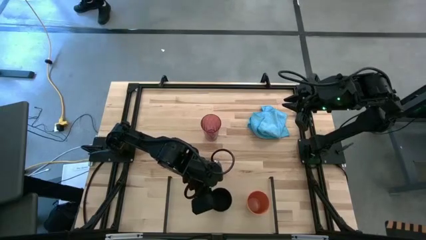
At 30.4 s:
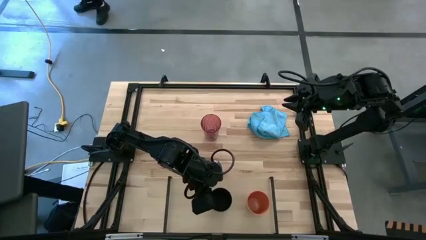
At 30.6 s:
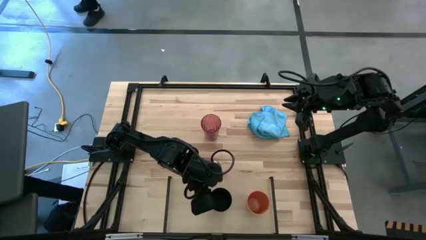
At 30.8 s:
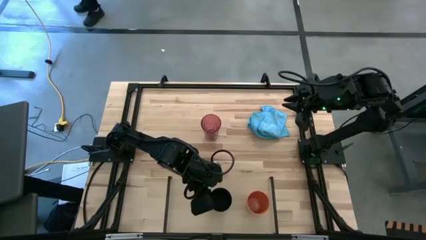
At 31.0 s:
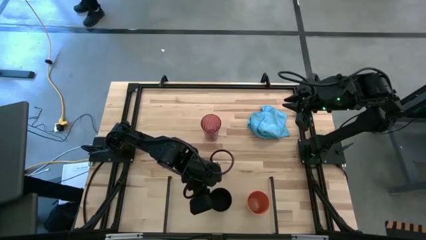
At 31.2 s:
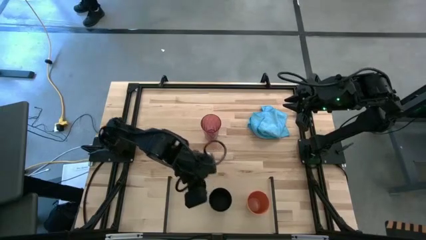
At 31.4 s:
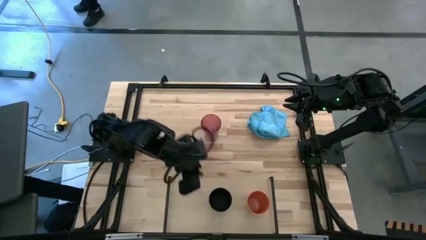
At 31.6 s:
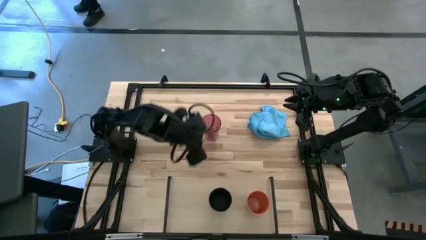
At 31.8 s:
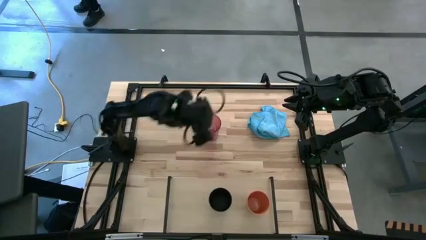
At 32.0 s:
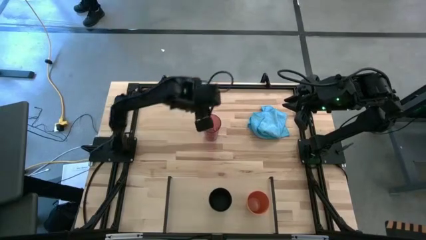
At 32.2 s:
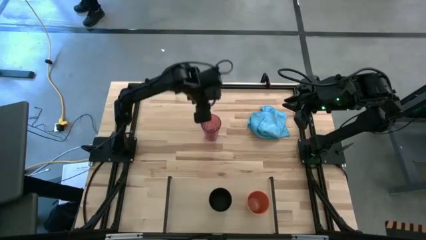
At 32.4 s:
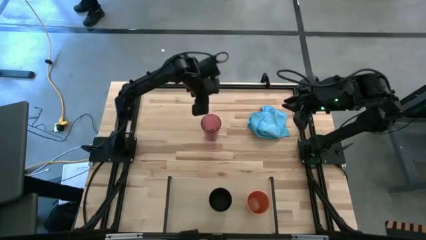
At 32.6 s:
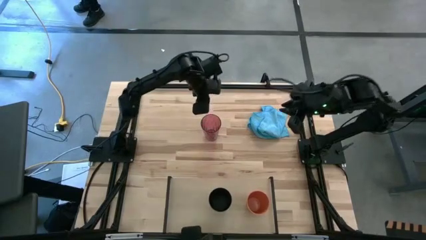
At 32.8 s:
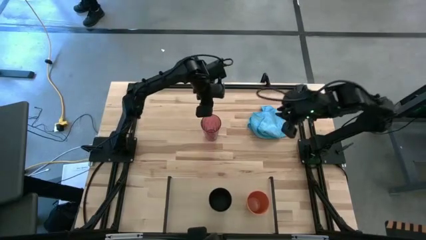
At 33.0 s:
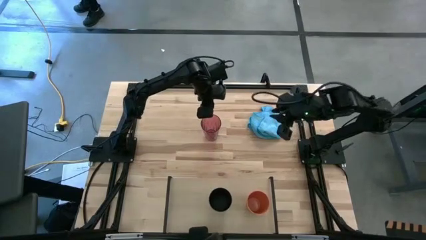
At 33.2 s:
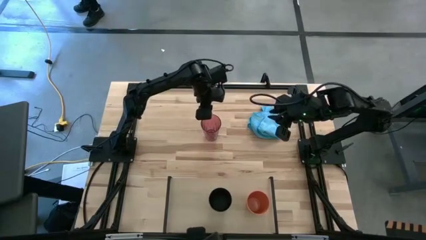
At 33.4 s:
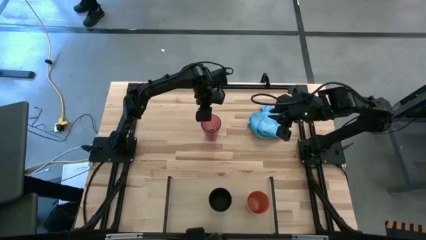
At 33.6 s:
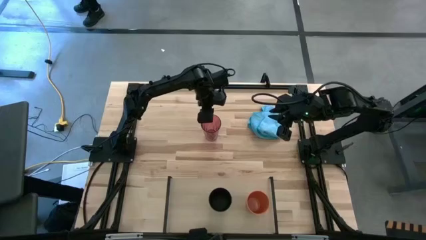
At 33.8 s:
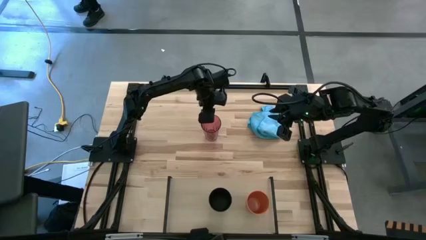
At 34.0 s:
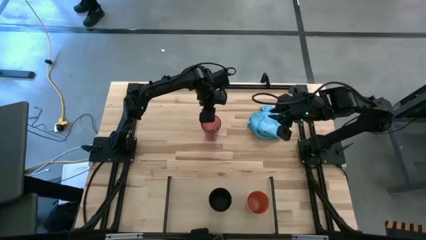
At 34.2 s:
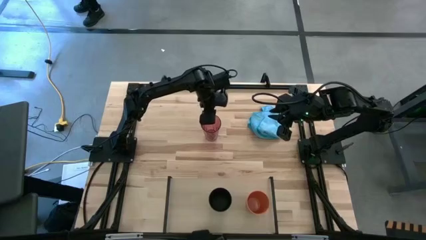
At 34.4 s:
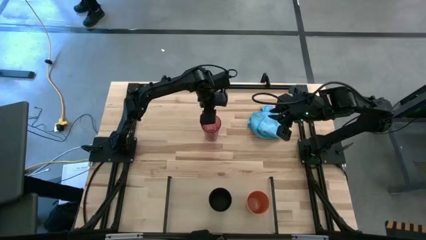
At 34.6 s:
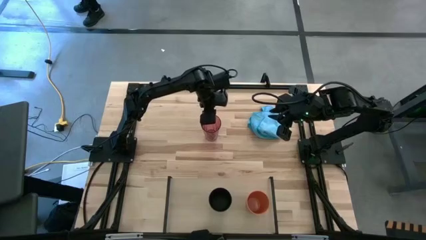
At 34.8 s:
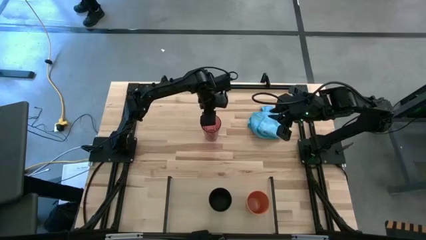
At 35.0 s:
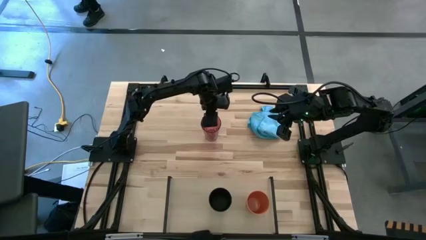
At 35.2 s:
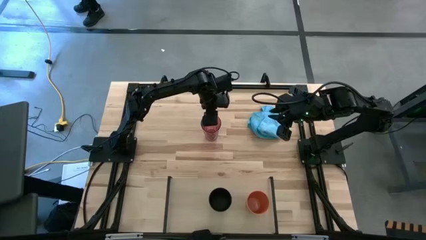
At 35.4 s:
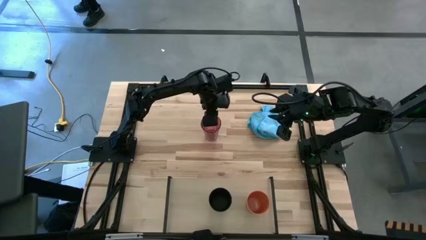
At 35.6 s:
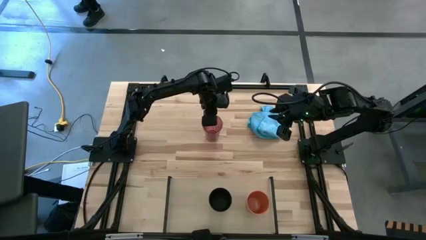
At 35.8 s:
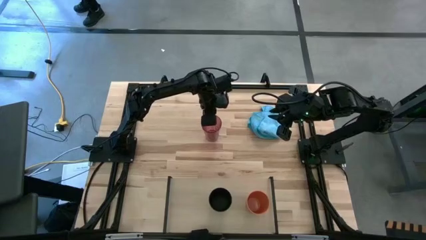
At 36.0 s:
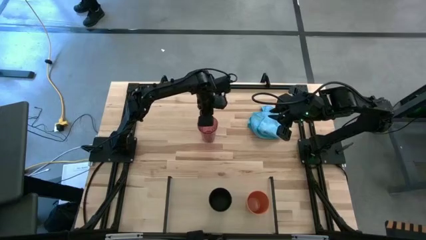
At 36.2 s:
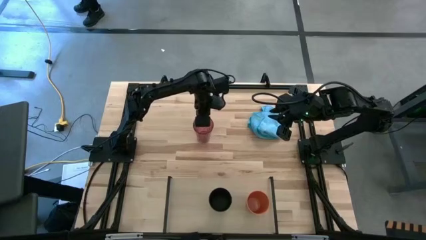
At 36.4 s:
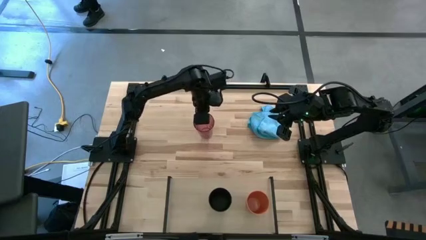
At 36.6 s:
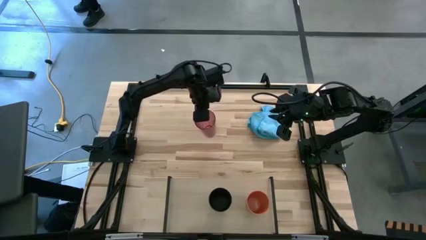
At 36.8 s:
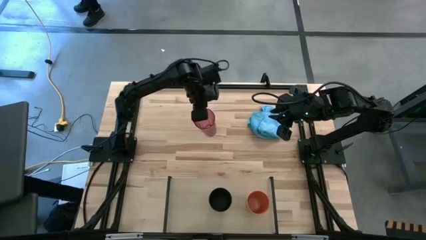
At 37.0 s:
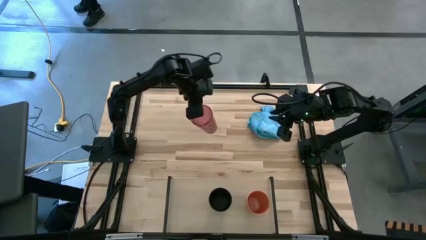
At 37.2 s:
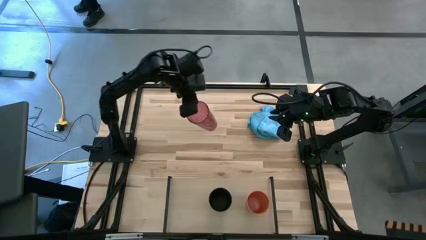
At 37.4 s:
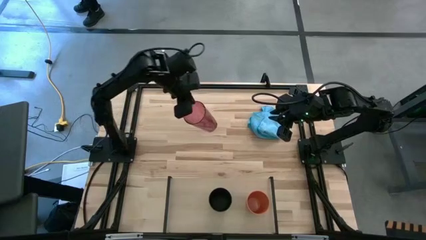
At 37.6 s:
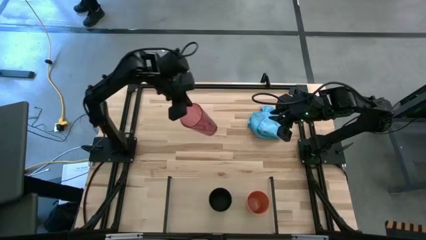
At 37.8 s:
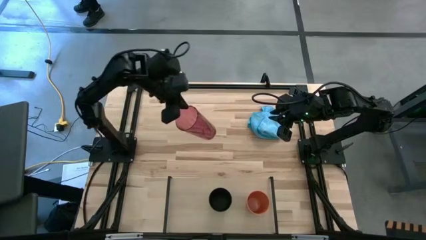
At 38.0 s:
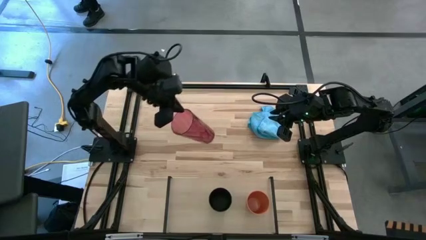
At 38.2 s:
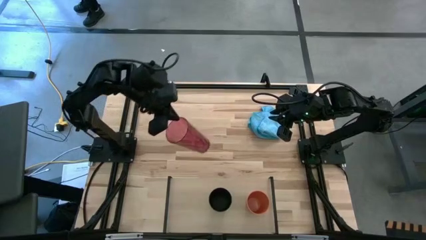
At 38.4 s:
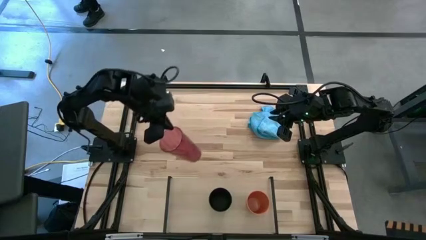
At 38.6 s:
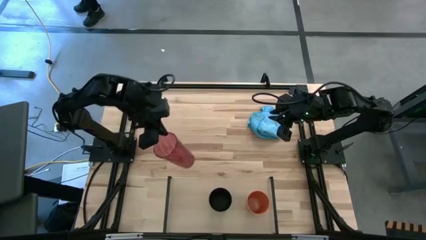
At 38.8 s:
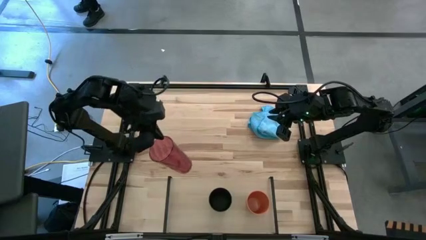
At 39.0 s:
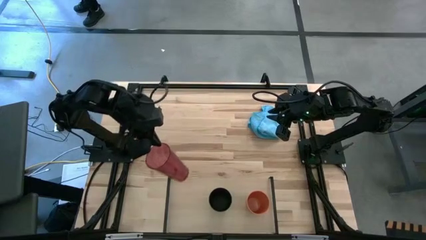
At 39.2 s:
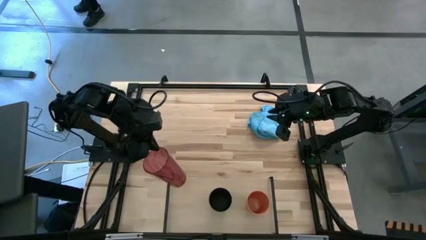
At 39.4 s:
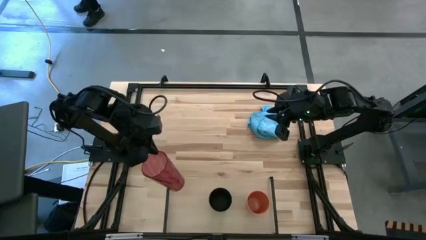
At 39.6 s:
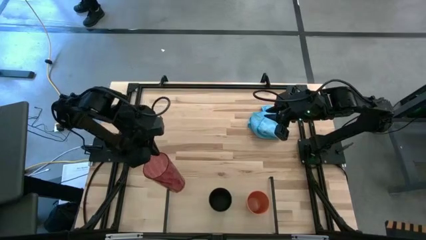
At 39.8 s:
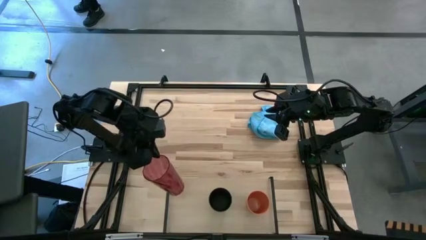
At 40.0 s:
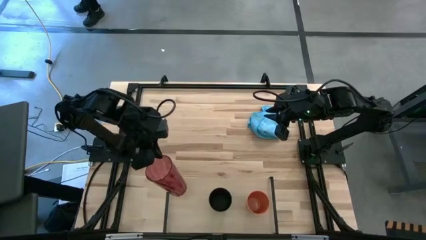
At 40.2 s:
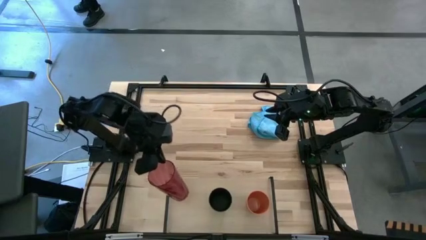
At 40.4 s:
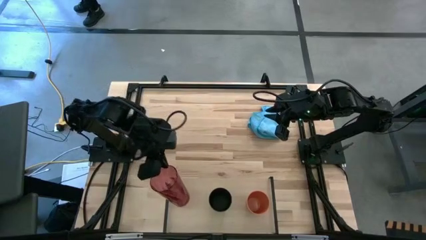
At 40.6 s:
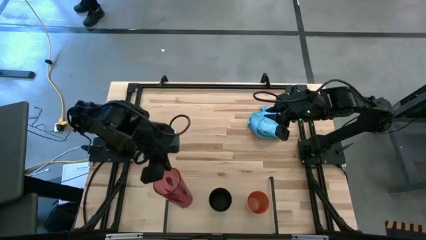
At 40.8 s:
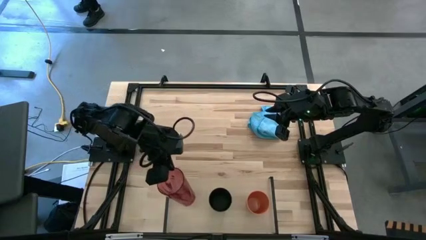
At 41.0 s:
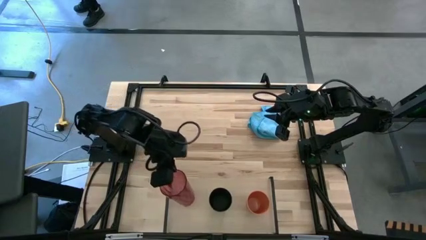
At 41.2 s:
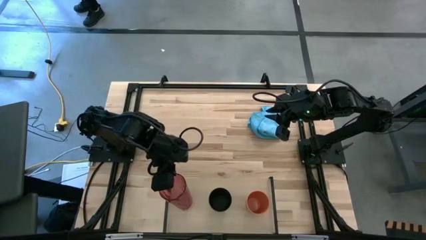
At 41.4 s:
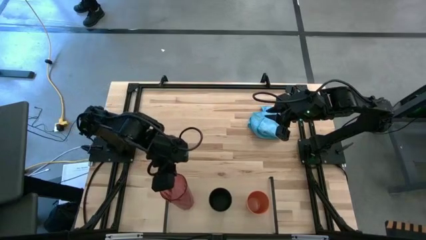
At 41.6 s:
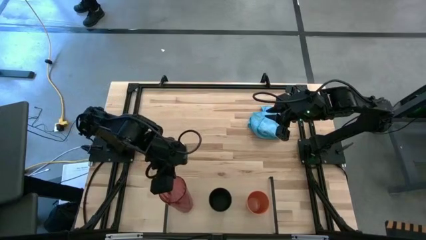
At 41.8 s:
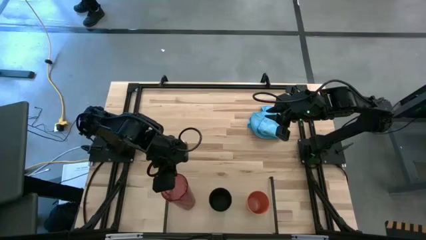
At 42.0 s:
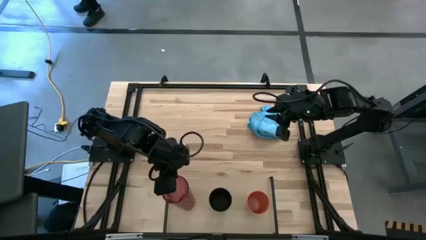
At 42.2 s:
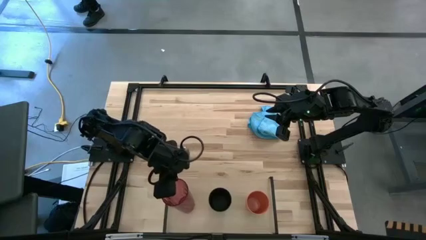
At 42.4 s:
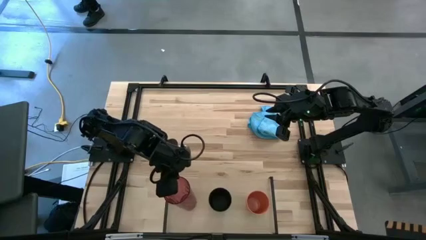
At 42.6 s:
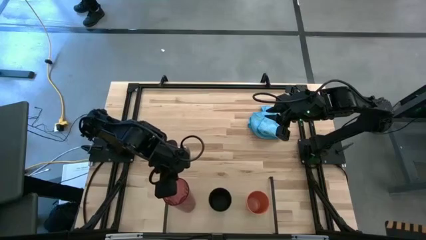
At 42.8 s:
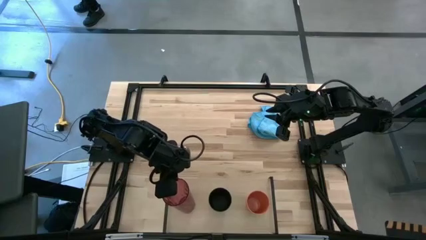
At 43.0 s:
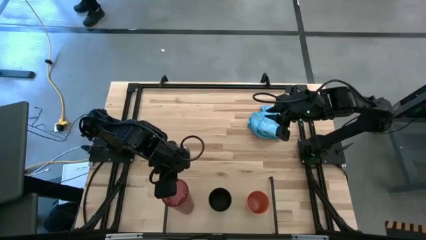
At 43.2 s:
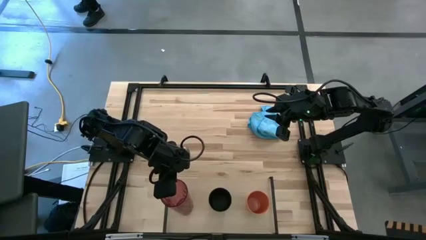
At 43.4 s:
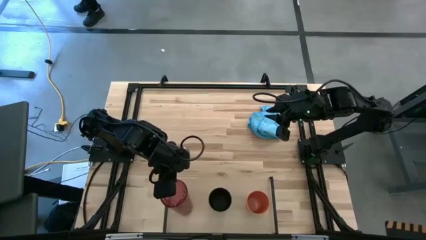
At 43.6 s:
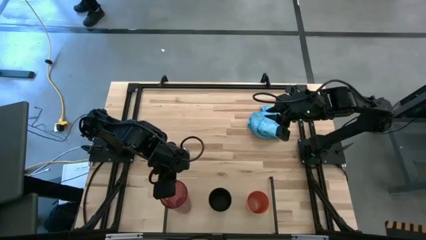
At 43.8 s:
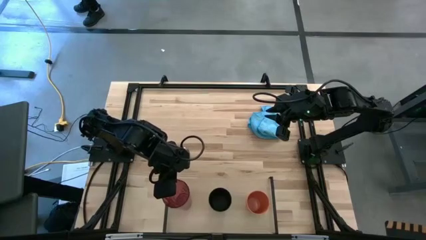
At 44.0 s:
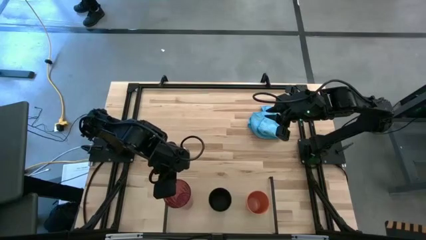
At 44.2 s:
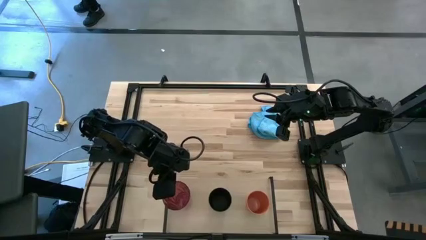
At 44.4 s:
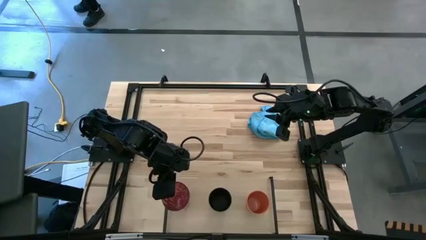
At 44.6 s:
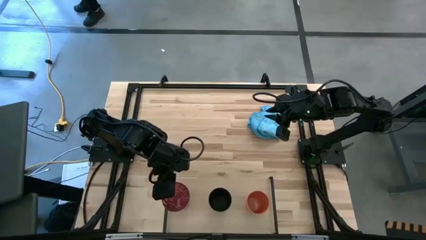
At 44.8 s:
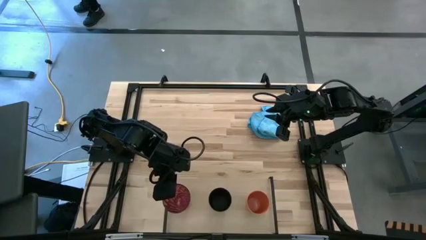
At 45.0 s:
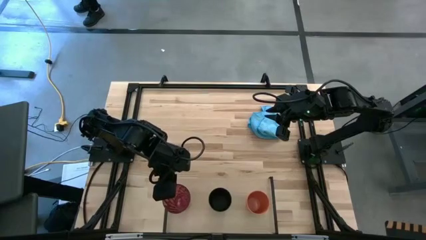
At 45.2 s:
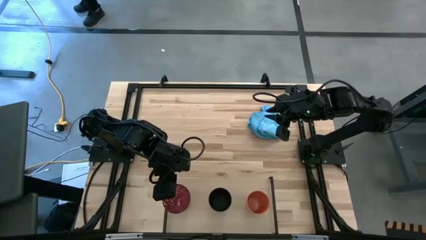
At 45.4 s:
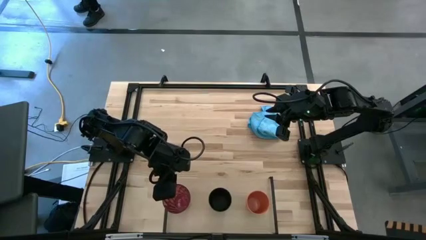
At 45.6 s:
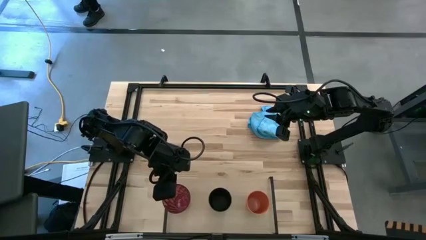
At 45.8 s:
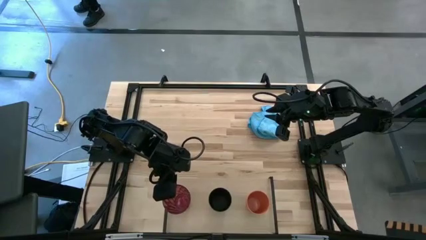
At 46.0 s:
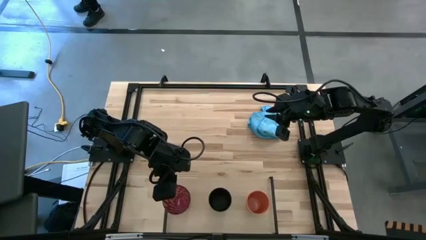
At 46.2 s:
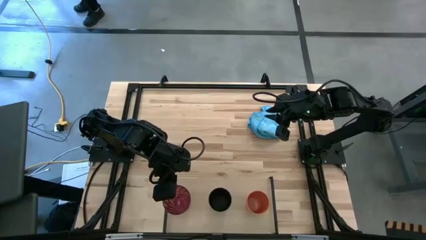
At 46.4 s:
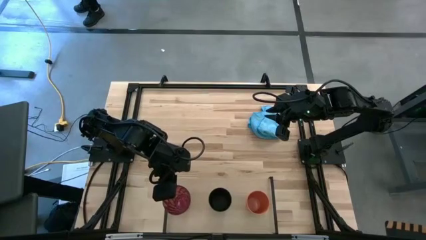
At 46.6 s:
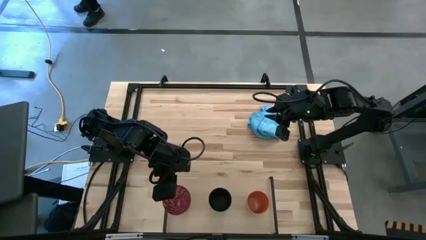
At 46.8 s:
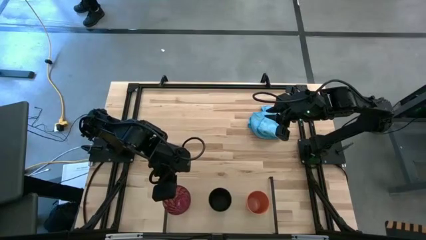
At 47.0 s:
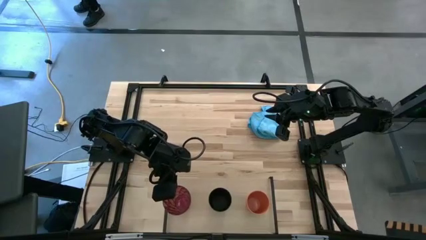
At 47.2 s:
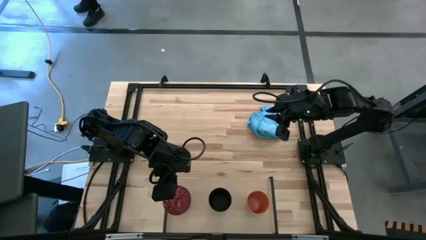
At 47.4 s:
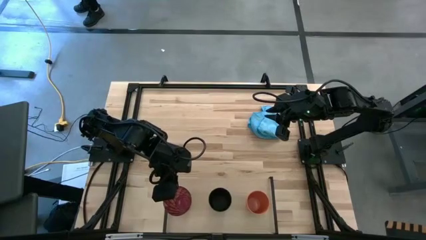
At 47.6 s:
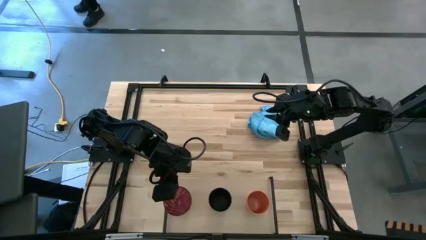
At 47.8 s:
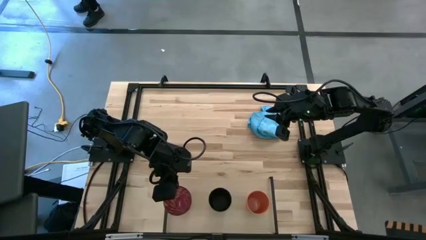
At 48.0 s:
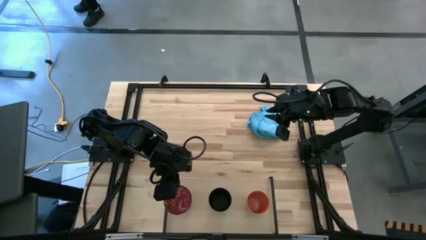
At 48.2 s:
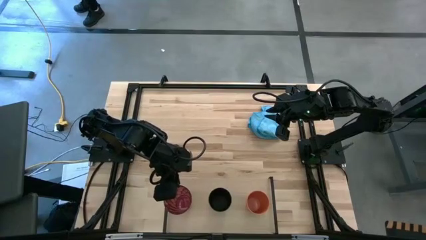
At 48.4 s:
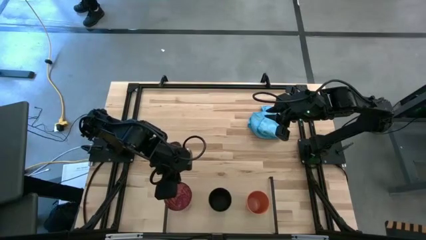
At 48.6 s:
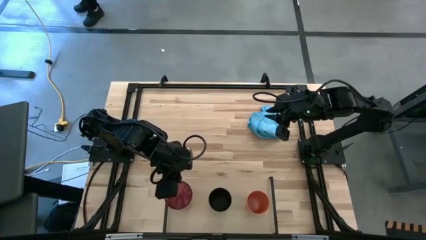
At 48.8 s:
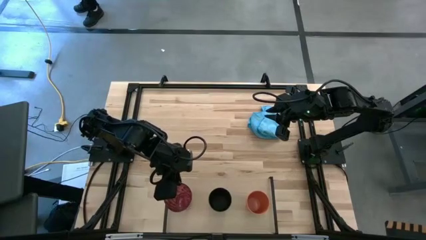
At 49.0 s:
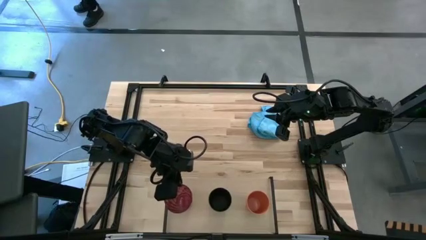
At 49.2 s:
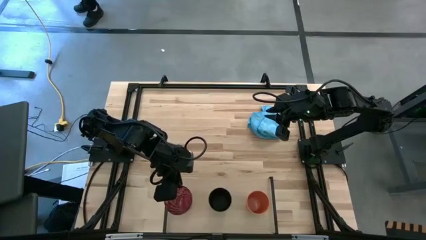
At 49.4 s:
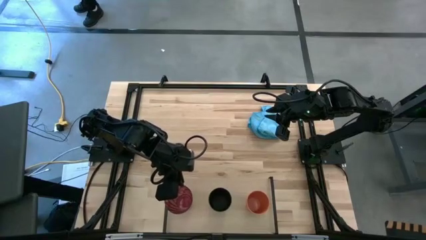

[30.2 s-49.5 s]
Task: Stack small to large cups/mugs on shelf
Put the red cup on the shelf
